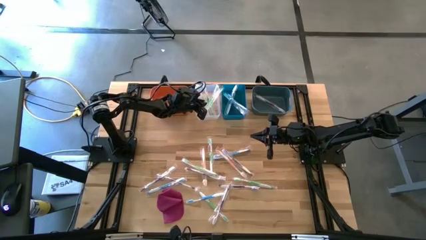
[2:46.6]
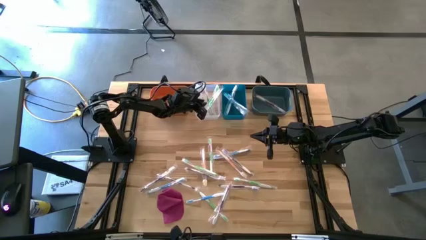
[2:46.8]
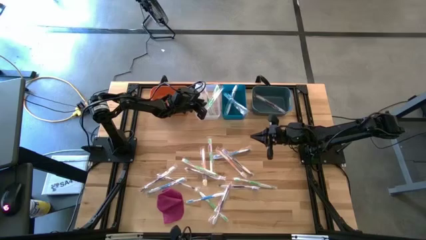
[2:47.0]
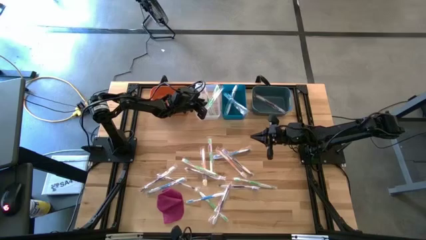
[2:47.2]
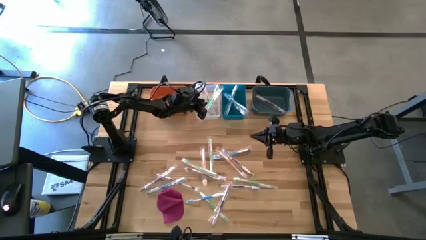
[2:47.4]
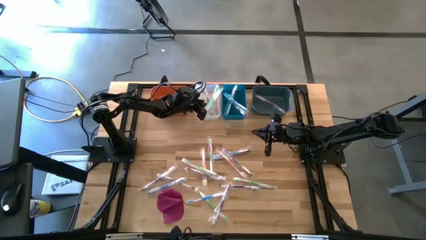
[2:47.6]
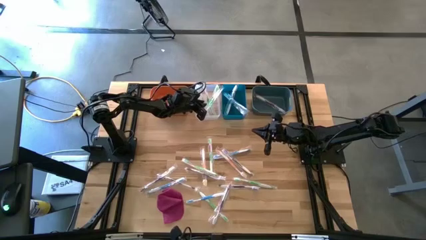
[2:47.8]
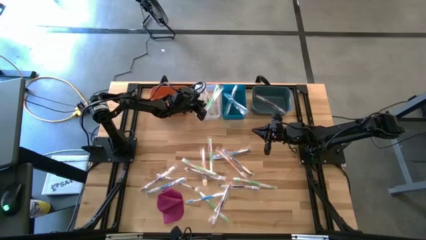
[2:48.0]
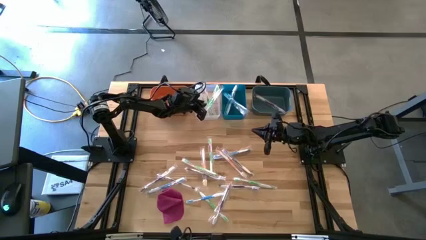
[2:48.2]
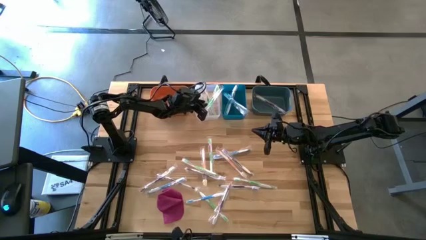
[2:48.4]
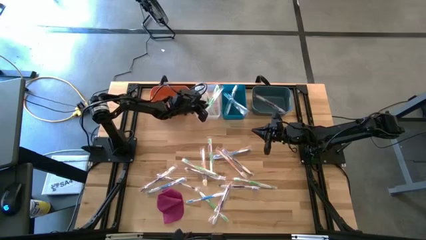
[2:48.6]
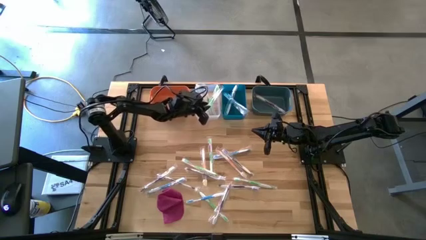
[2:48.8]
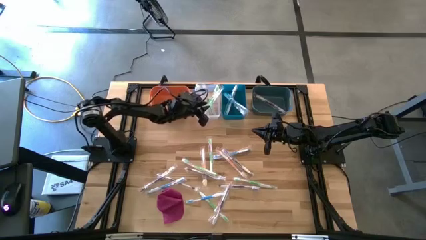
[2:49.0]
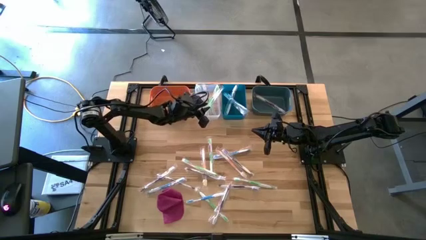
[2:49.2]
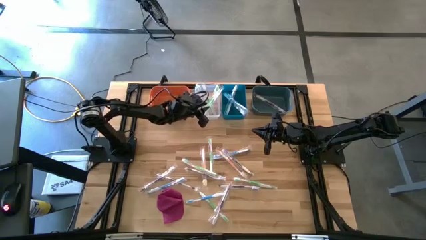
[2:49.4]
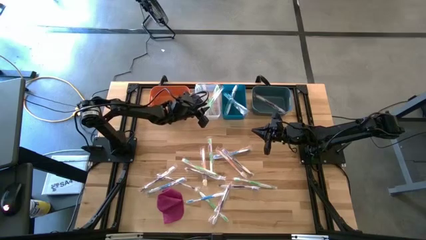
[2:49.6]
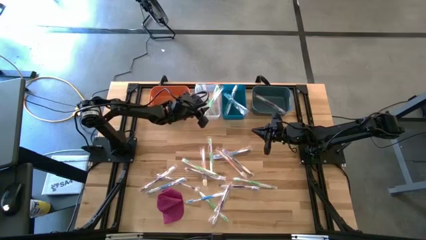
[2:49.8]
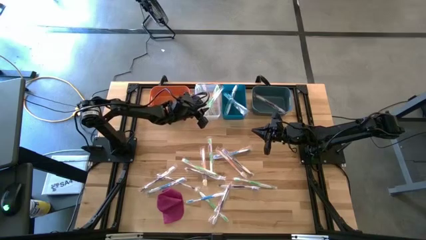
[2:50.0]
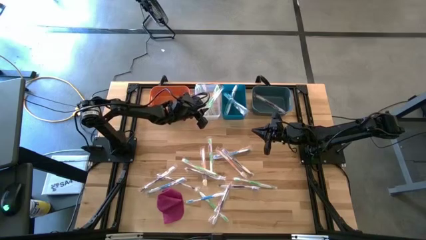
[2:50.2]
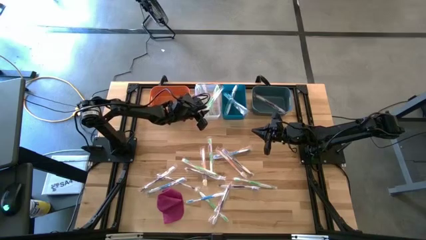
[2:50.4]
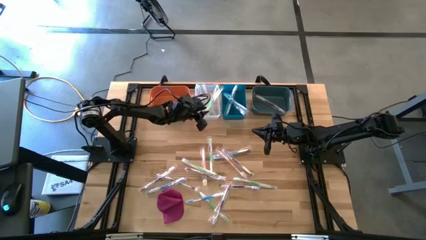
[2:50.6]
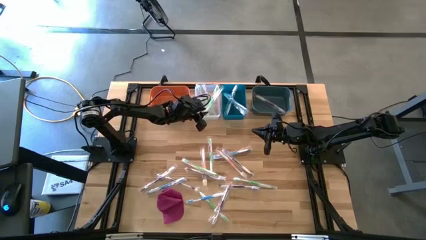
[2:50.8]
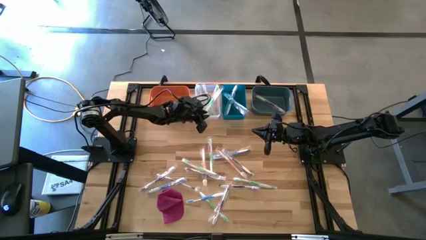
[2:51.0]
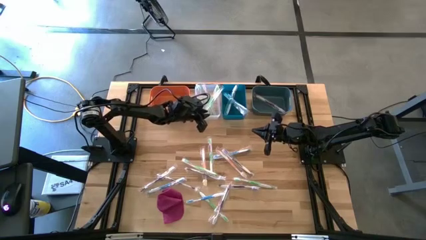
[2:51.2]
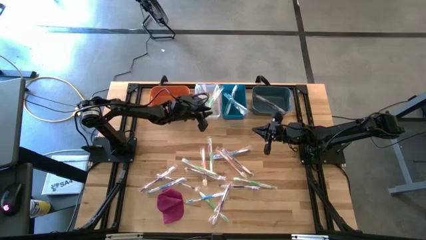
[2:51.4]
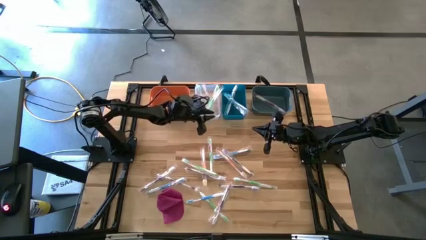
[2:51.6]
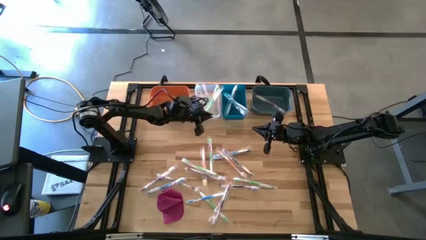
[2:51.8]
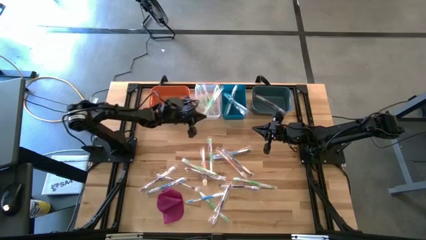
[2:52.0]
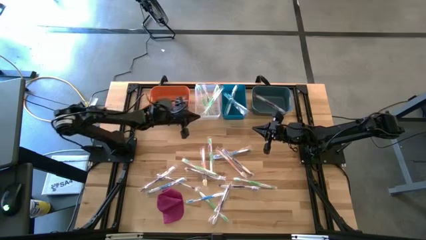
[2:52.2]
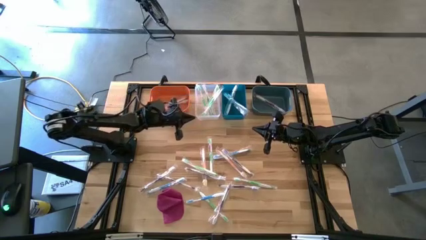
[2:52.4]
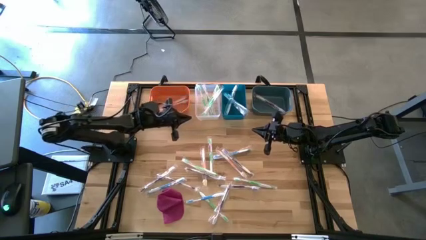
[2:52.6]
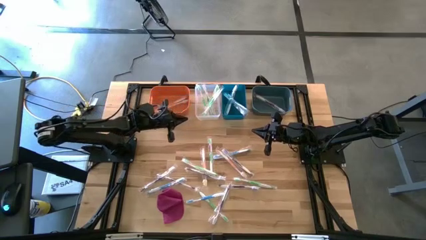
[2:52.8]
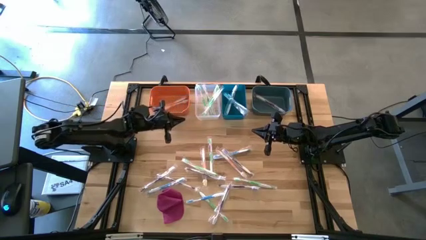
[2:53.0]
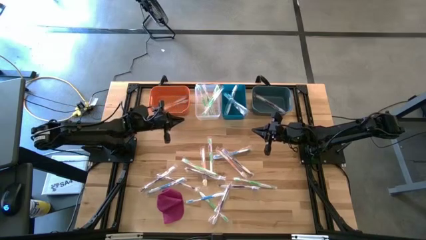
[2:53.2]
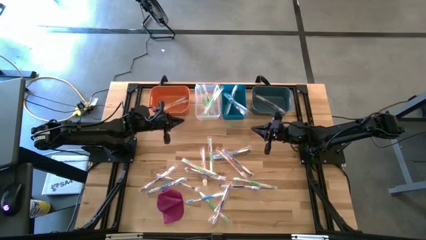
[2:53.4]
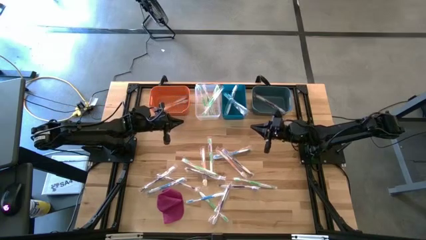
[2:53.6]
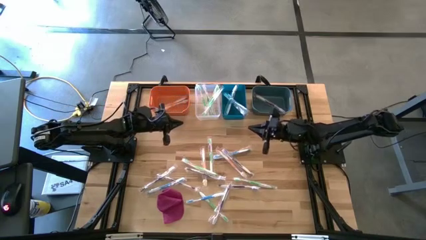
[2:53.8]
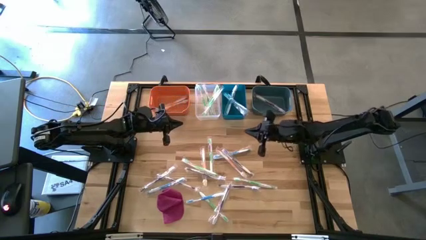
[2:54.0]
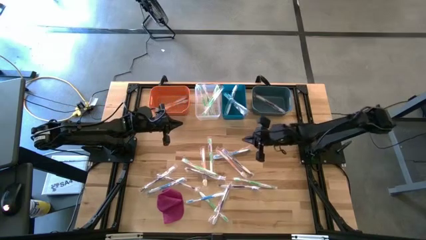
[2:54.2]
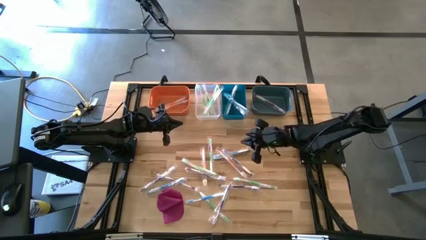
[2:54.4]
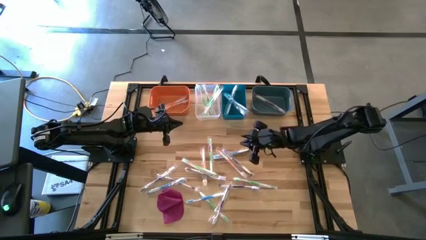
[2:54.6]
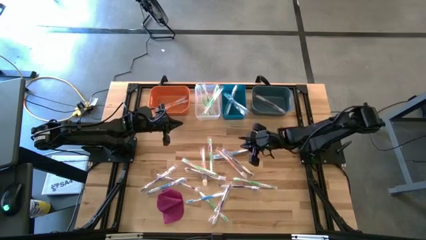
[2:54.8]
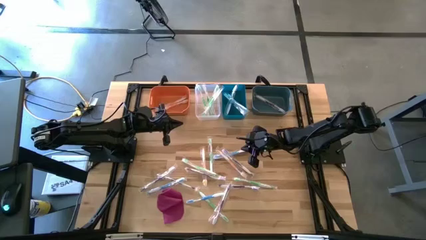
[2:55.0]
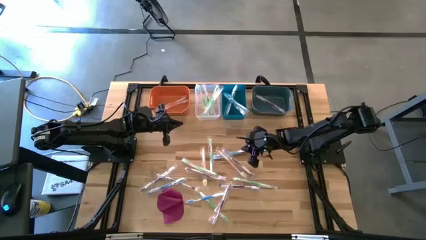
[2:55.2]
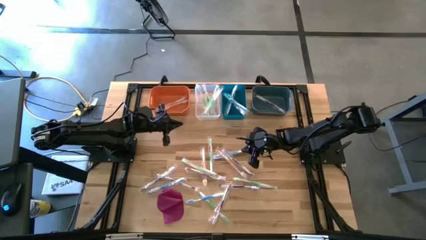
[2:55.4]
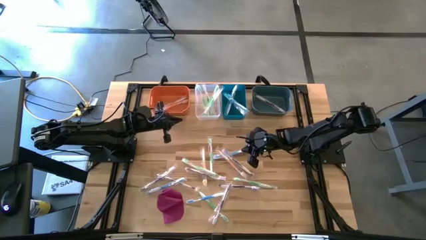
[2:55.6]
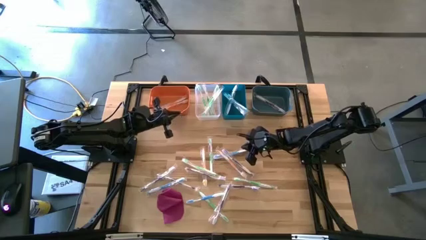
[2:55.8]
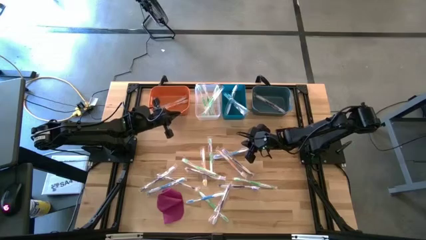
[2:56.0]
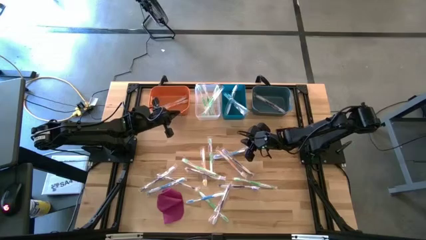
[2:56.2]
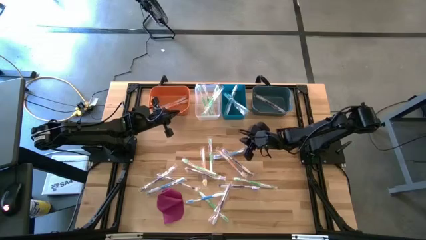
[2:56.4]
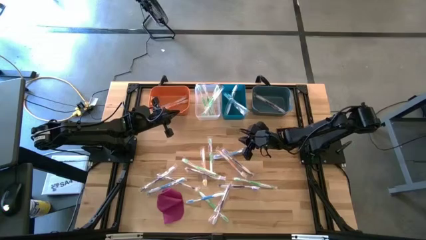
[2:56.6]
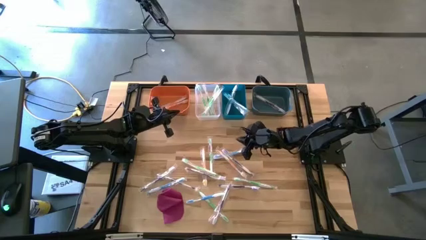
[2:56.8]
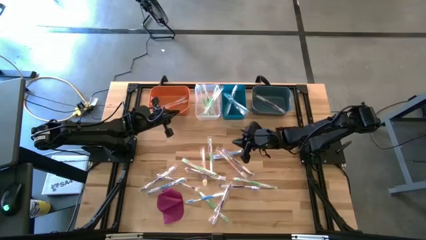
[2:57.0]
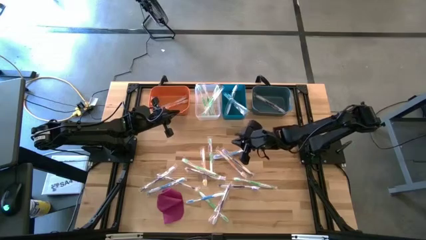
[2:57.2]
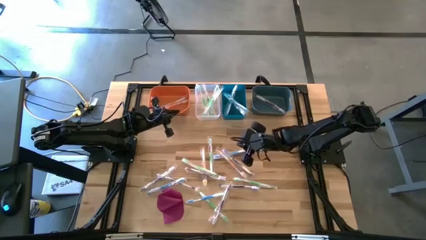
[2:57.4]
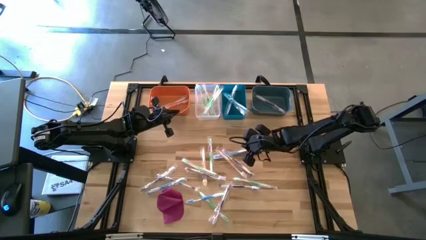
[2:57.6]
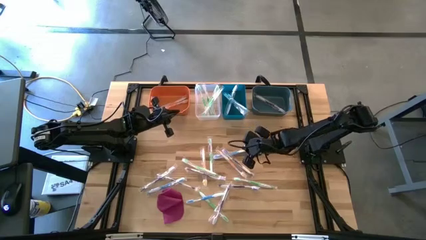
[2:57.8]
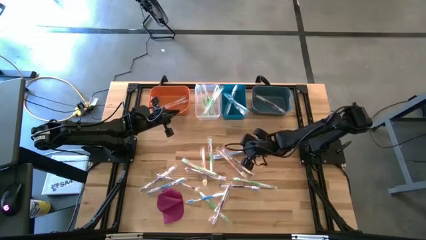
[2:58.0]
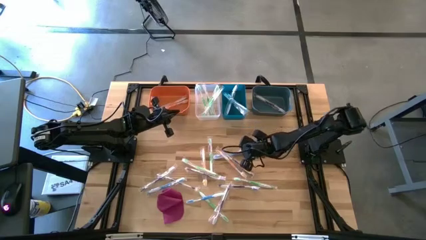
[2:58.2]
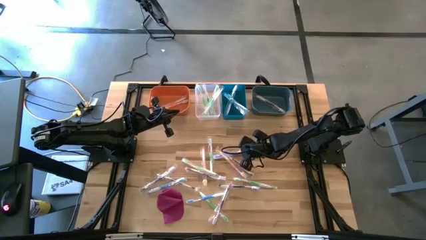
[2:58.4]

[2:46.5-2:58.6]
Task: Pick & Place Toothbrushes
Put the blue toothbrush into the blue bin
